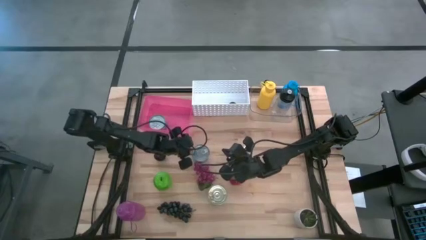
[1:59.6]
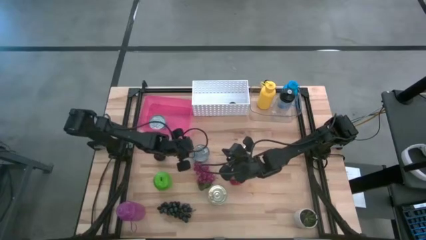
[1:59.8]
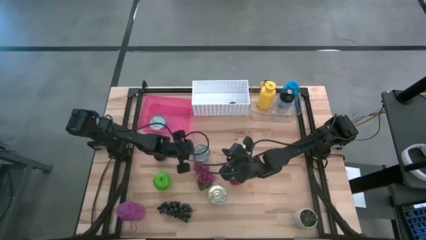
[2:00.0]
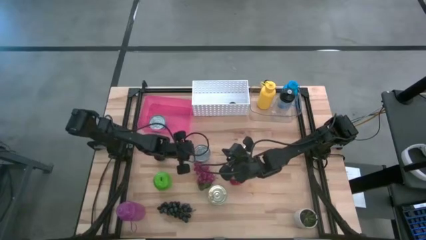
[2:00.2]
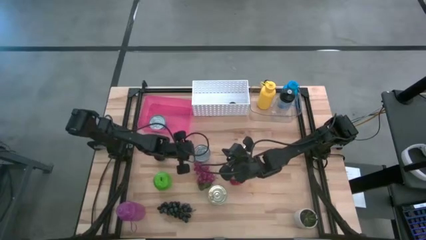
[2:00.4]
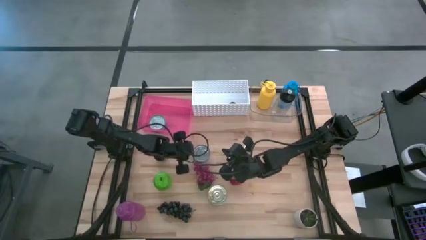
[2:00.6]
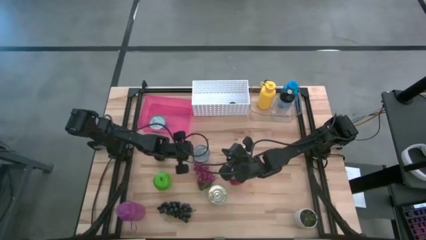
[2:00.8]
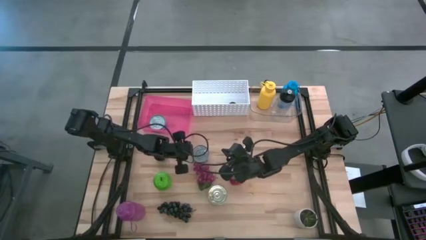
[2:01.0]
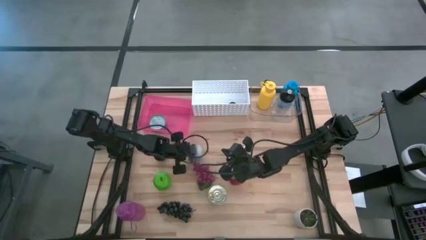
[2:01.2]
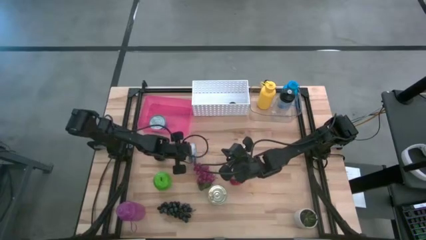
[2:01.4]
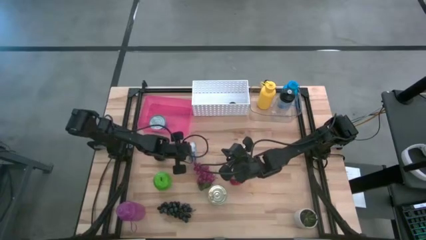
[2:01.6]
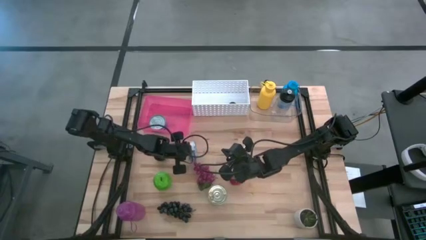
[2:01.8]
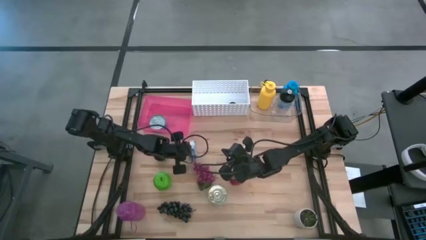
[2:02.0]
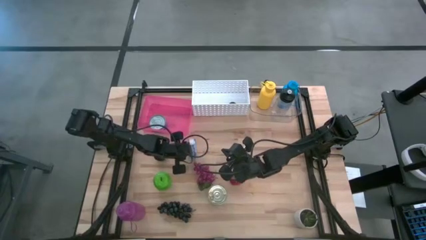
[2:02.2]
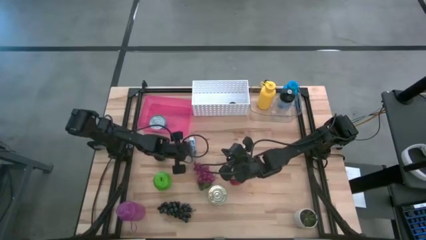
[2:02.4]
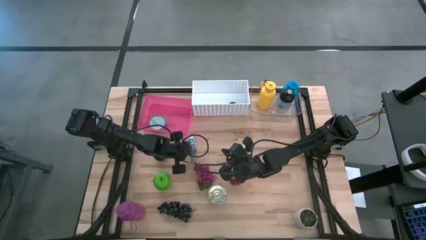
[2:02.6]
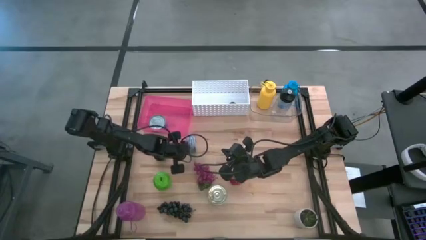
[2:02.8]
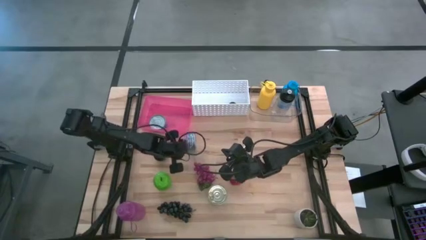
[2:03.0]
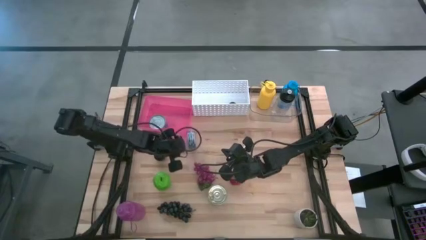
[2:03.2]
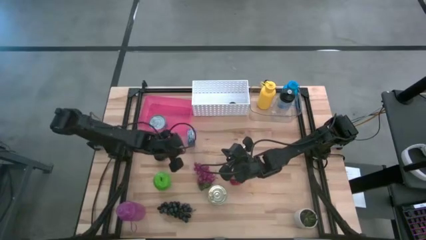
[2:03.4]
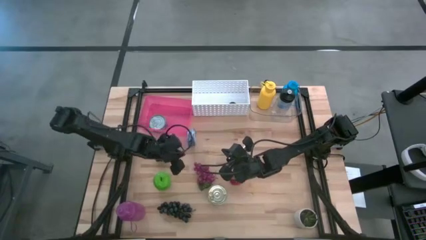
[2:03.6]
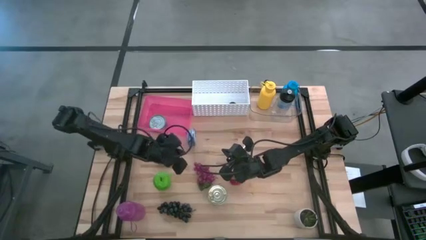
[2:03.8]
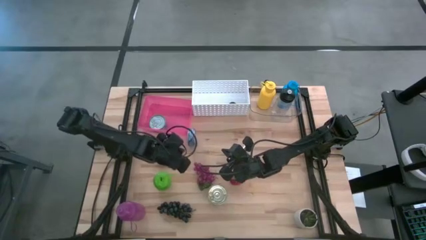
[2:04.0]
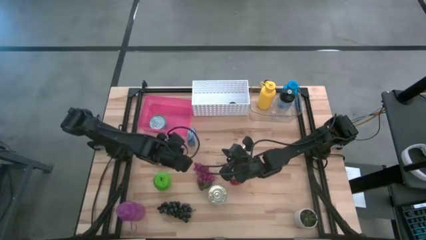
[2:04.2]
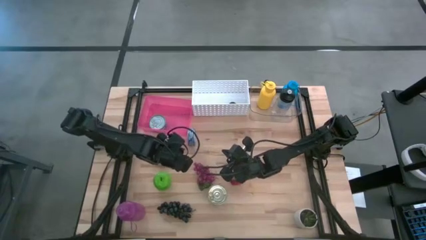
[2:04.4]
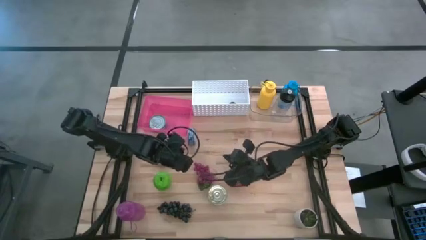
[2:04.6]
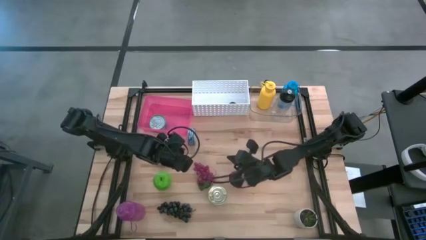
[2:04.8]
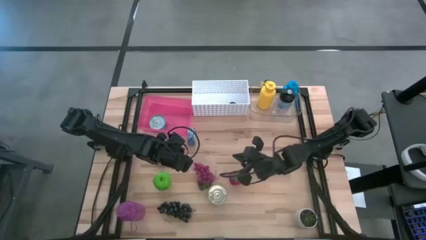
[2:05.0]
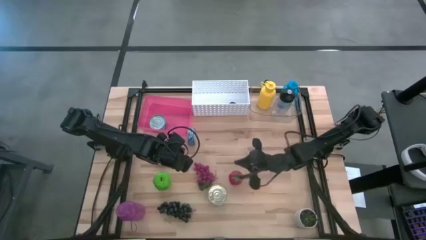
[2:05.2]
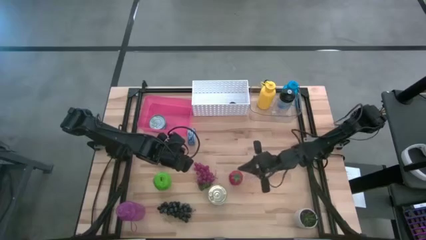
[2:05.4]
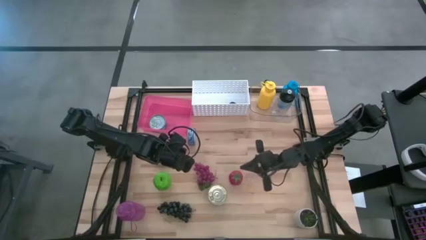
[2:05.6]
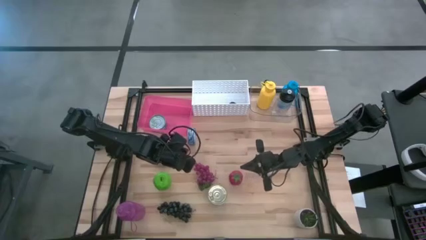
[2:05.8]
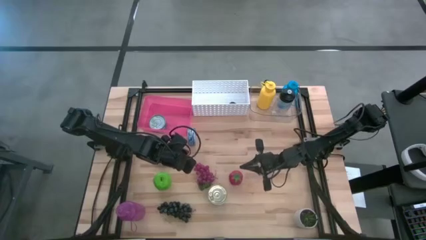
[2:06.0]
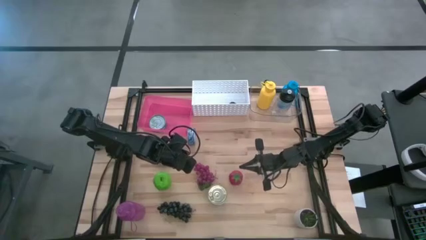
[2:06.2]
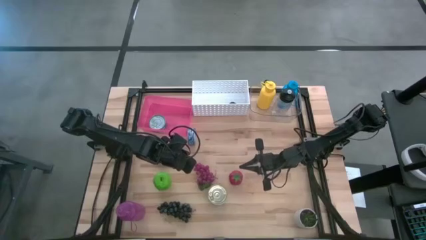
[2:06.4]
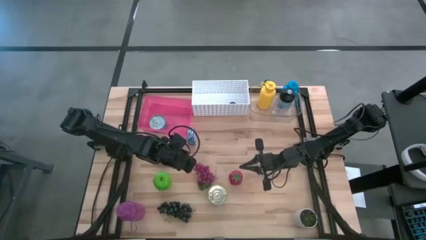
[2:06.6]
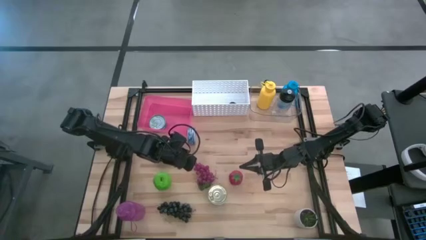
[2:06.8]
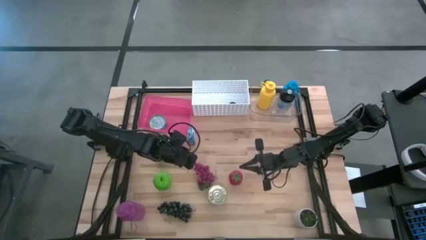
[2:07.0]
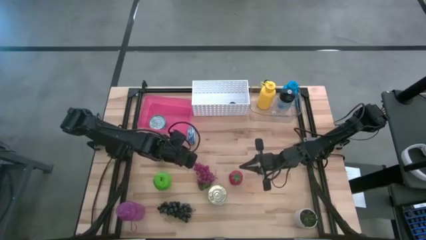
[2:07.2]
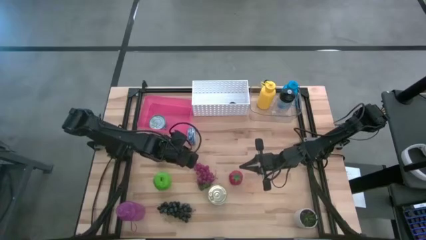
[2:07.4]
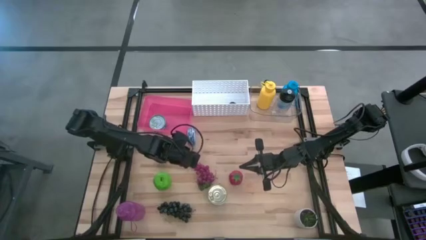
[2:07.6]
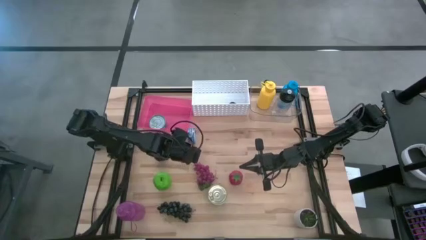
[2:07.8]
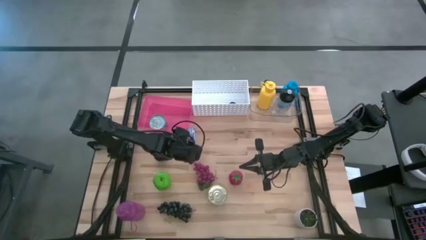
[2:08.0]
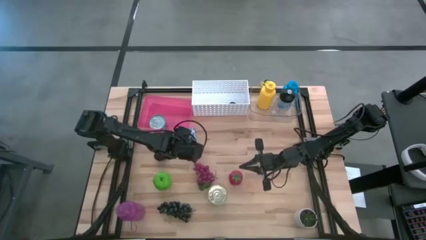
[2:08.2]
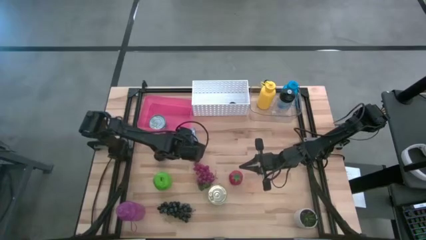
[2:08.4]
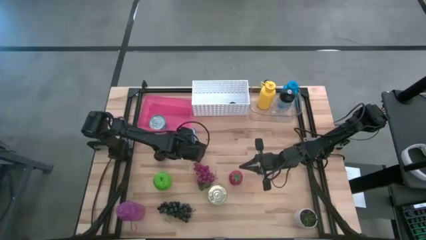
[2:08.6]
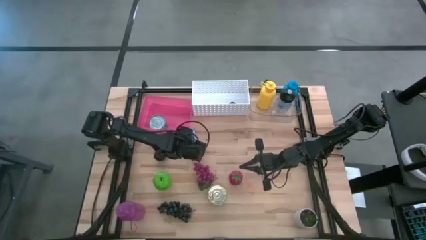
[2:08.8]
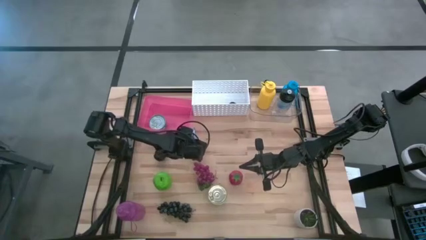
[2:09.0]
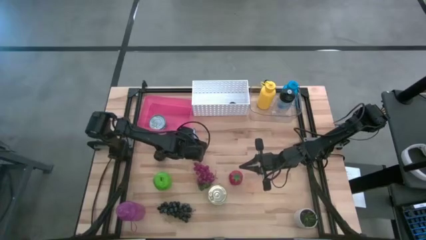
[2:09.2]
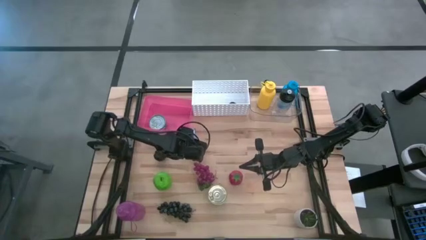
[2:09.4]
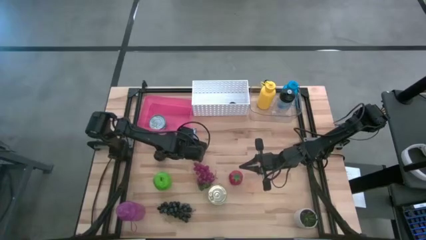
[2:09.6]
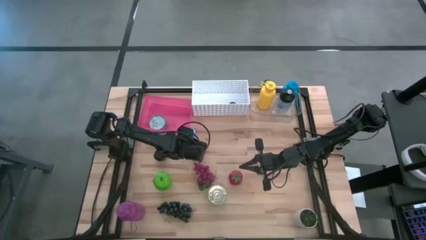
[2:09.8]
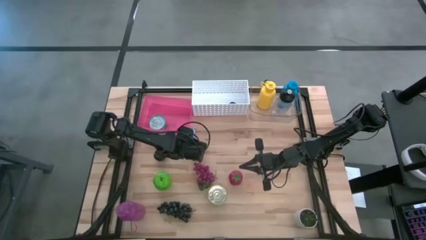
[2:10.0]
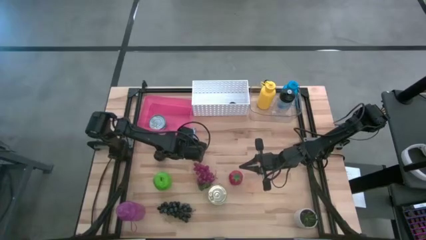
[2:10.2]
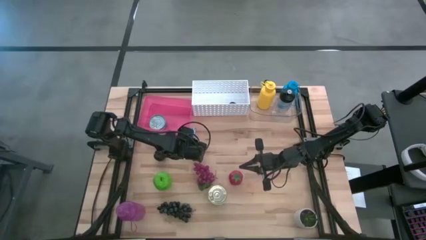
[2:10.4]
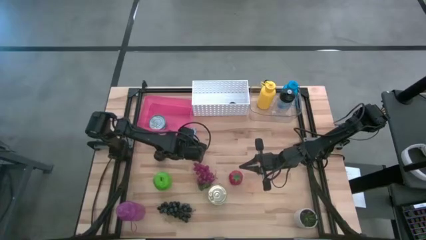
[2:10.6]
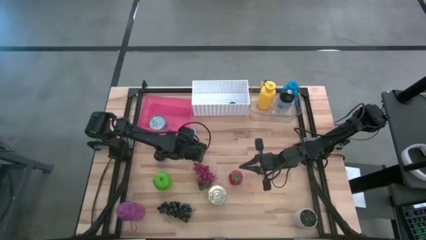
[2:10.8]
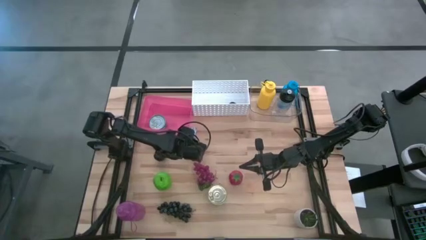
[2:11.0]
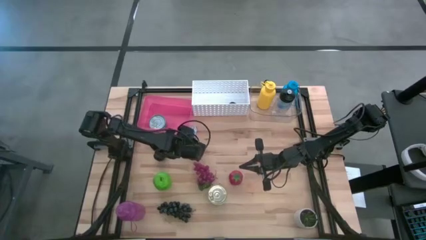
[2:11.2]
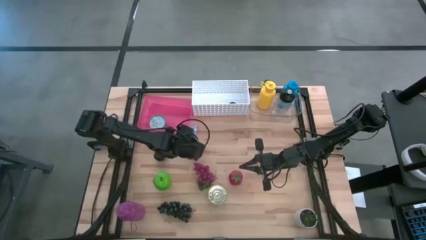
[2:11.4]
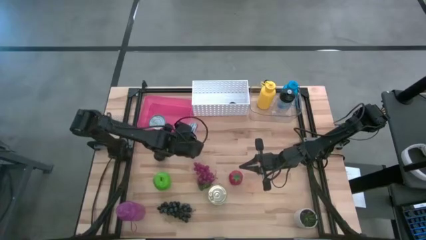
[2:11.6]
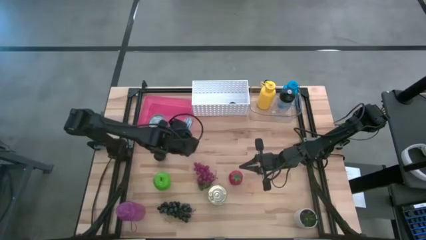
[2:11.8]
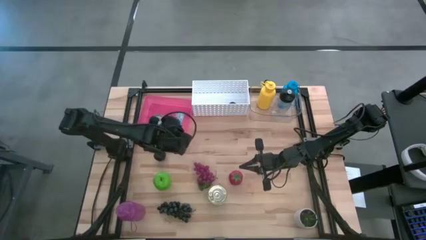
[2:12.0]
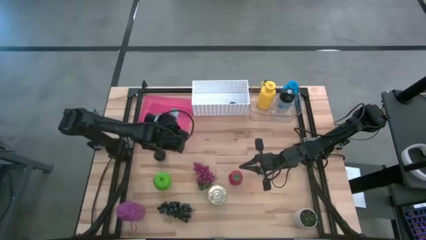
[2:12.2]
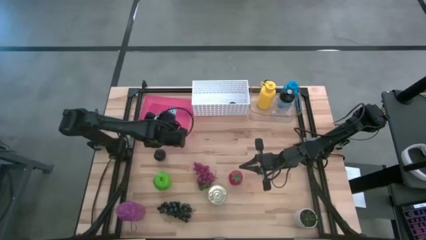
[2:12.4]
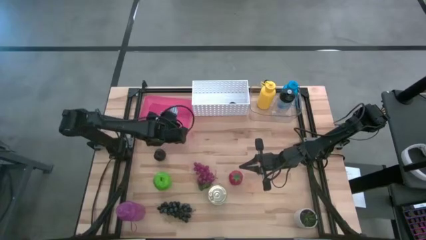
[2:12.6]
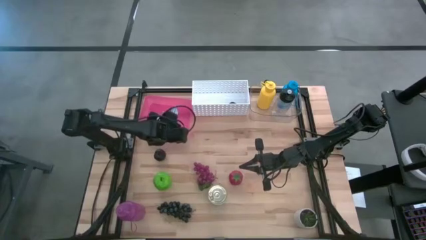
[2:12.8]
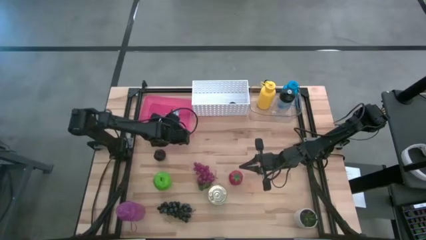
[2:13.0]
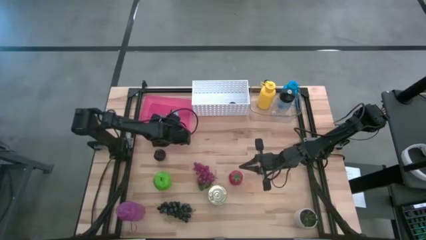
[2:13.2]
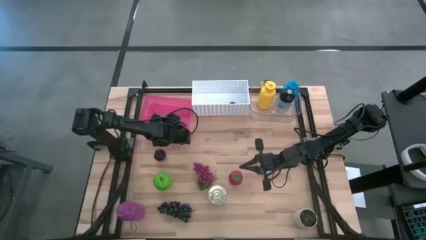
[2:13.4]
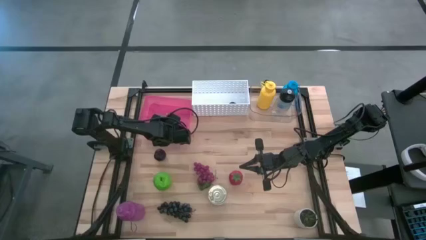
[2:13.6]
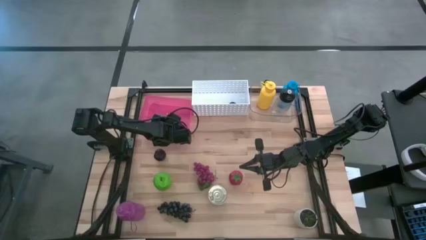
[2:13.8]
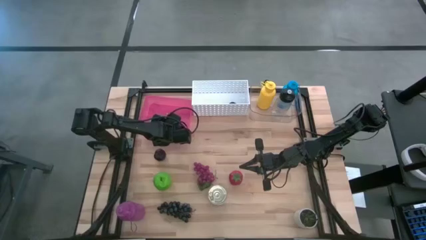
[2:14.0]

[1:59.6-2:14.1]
Task: Pick & Place Food Item
Put the blue tuna can into the pink bin
